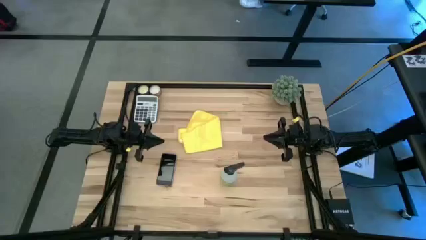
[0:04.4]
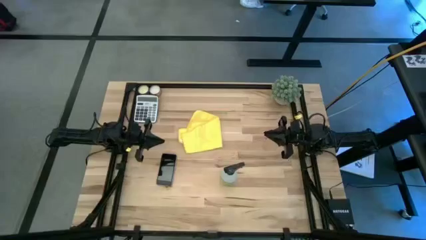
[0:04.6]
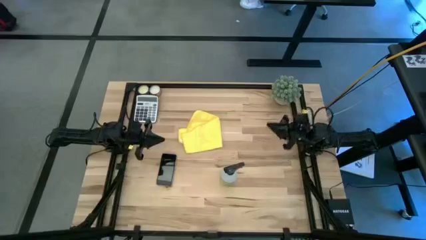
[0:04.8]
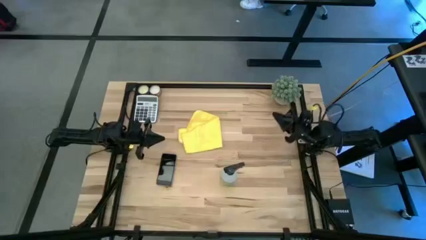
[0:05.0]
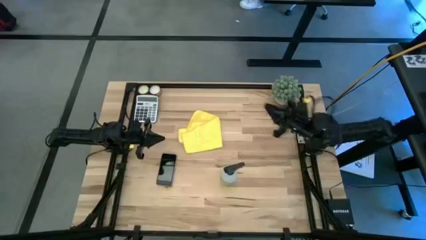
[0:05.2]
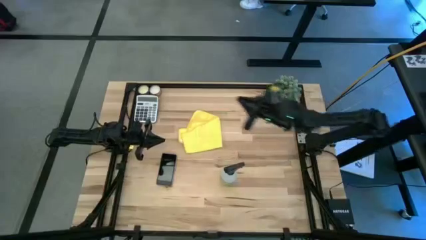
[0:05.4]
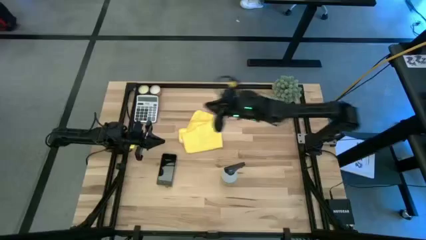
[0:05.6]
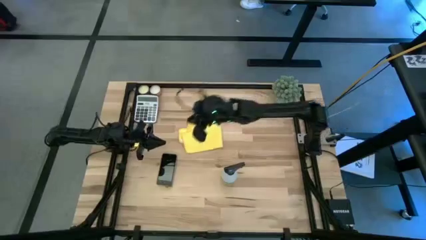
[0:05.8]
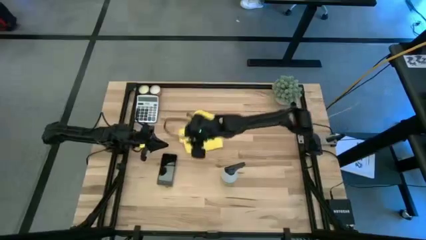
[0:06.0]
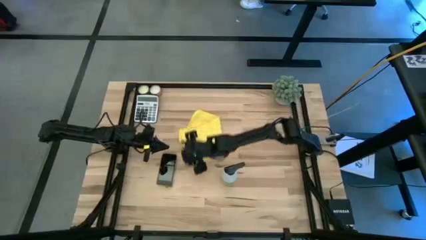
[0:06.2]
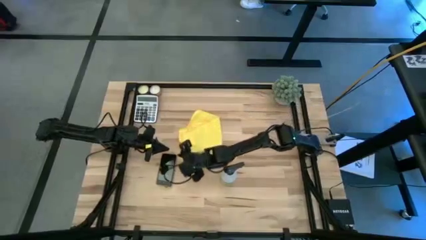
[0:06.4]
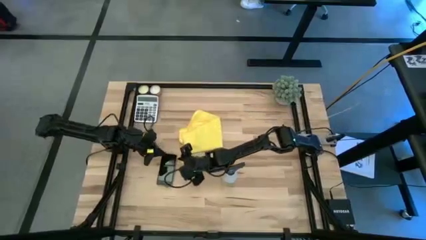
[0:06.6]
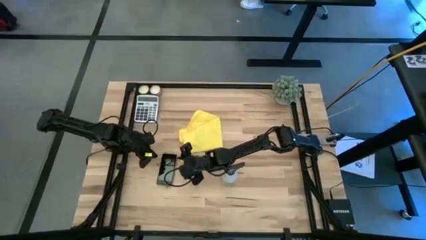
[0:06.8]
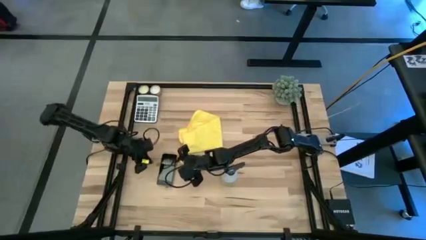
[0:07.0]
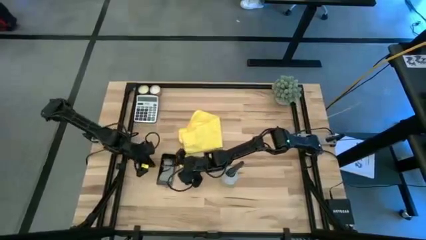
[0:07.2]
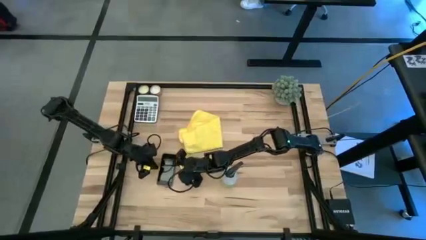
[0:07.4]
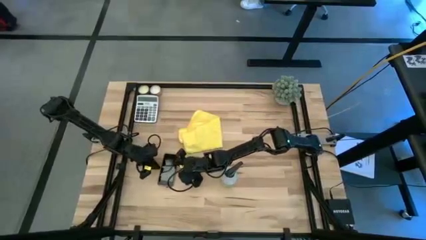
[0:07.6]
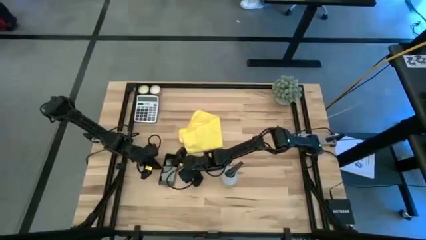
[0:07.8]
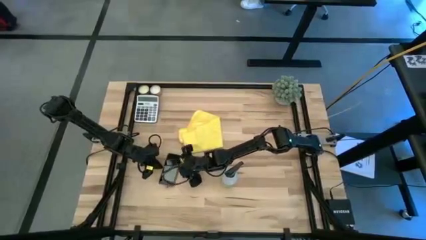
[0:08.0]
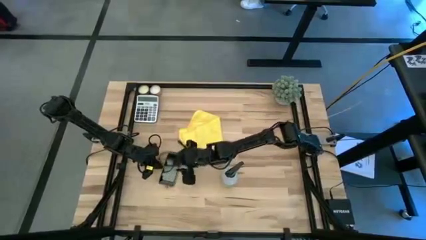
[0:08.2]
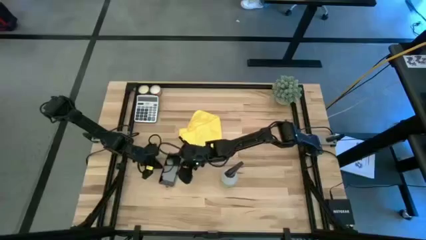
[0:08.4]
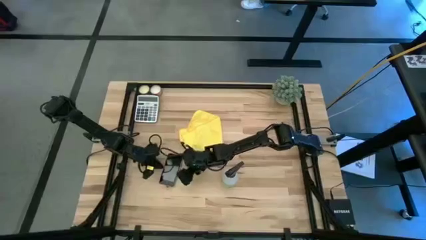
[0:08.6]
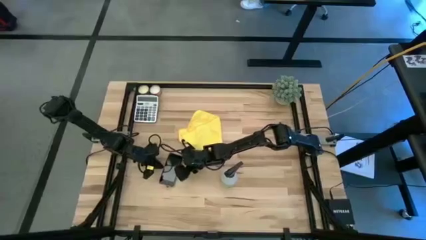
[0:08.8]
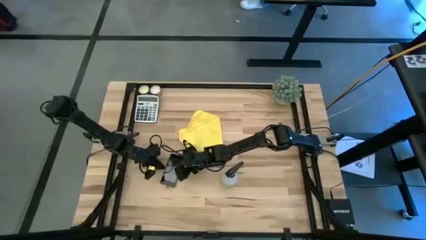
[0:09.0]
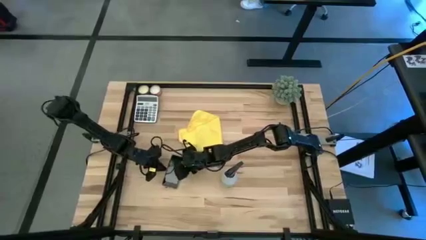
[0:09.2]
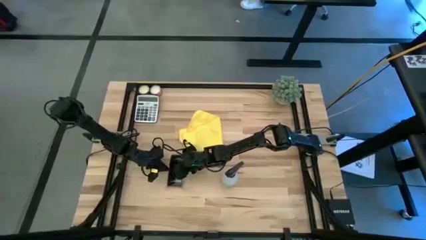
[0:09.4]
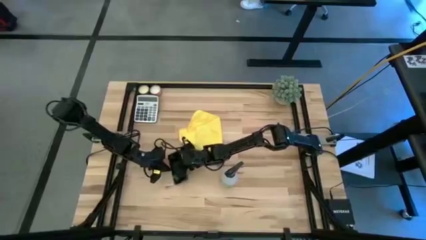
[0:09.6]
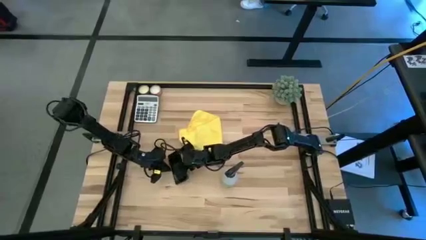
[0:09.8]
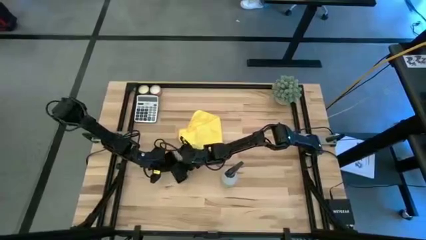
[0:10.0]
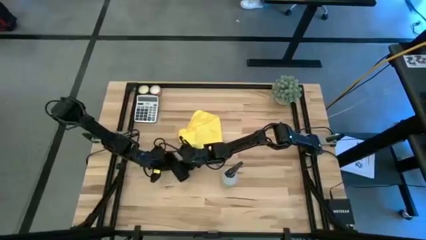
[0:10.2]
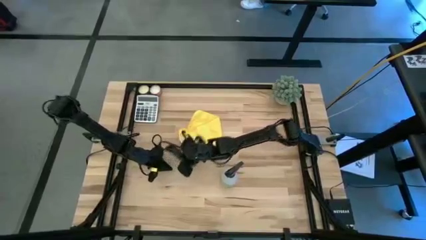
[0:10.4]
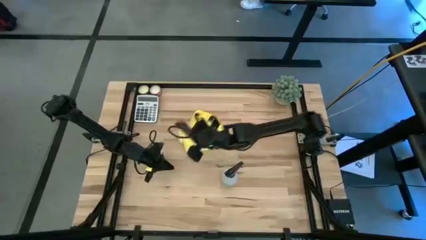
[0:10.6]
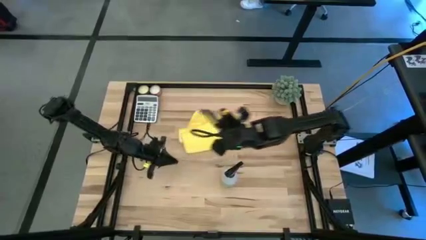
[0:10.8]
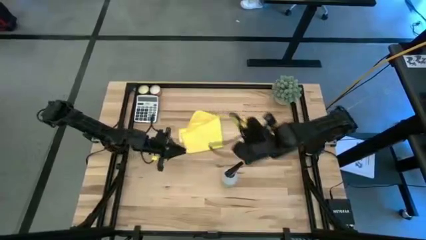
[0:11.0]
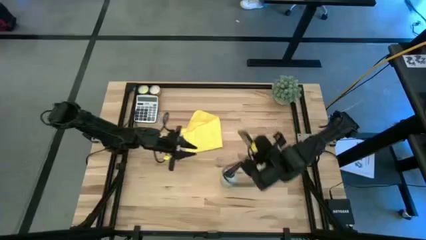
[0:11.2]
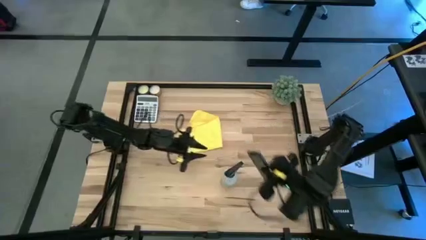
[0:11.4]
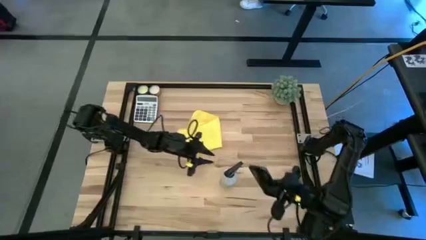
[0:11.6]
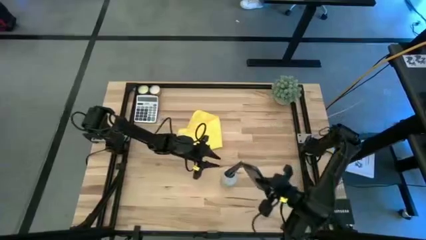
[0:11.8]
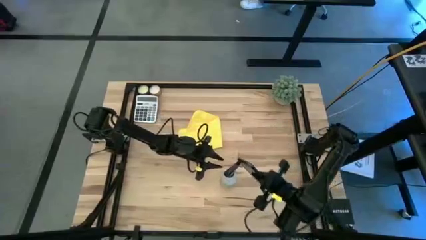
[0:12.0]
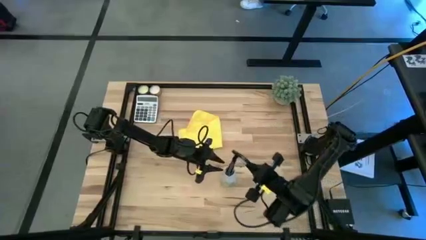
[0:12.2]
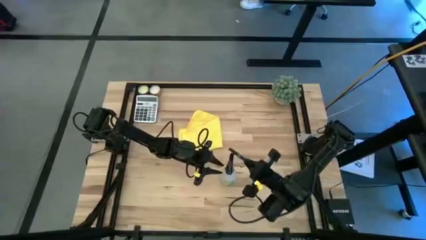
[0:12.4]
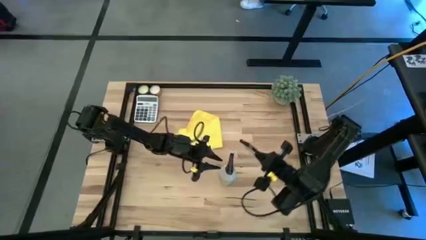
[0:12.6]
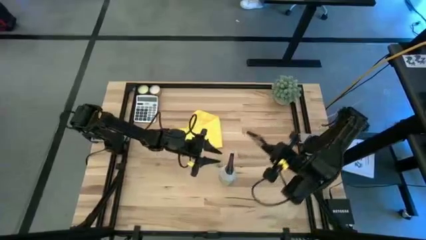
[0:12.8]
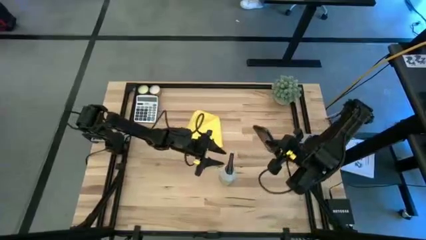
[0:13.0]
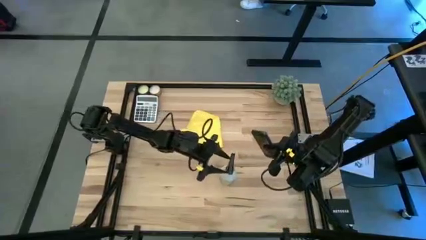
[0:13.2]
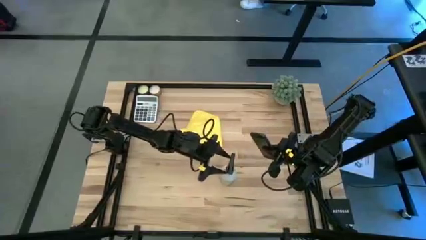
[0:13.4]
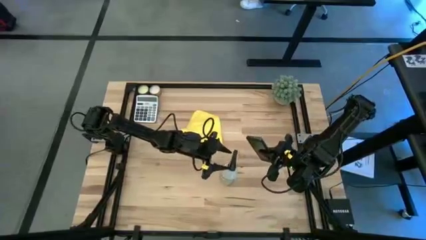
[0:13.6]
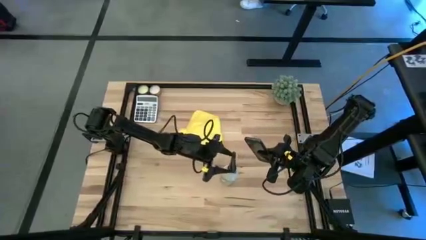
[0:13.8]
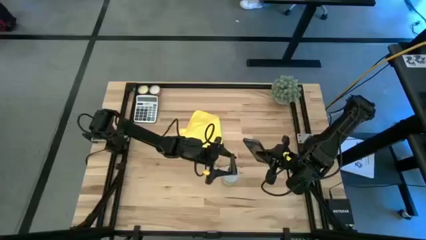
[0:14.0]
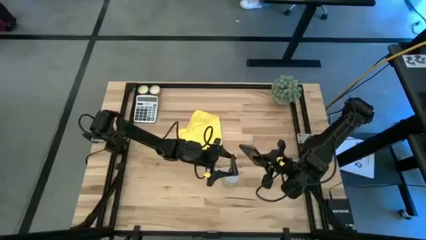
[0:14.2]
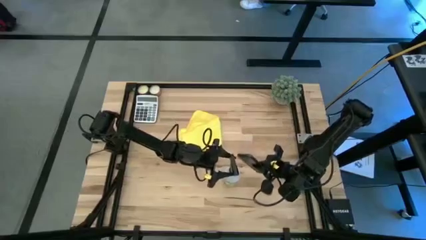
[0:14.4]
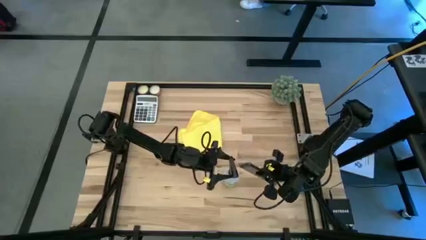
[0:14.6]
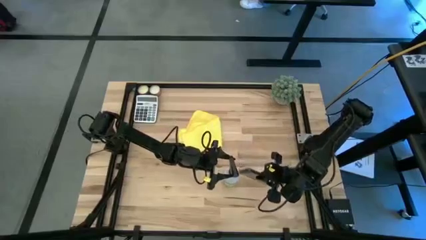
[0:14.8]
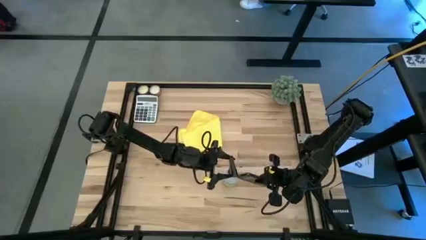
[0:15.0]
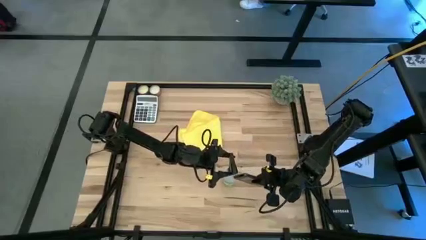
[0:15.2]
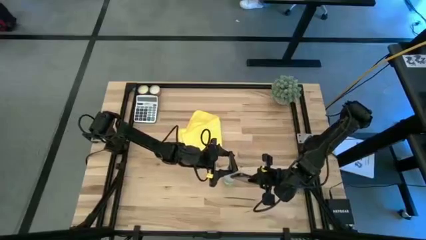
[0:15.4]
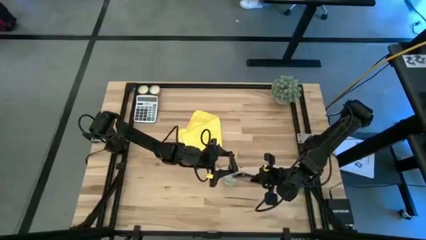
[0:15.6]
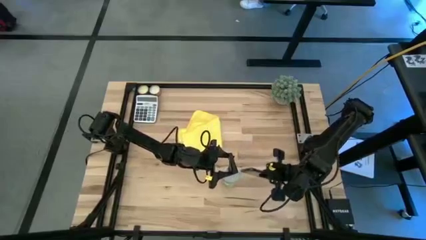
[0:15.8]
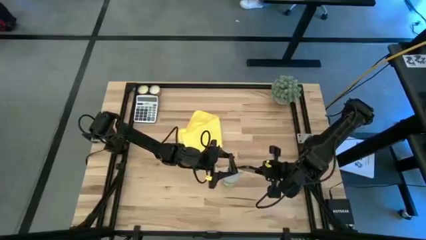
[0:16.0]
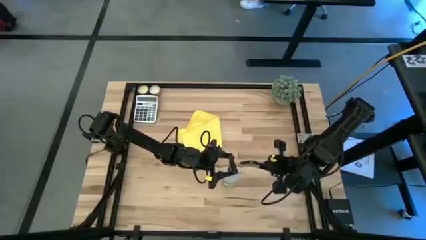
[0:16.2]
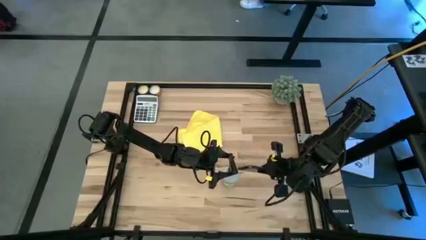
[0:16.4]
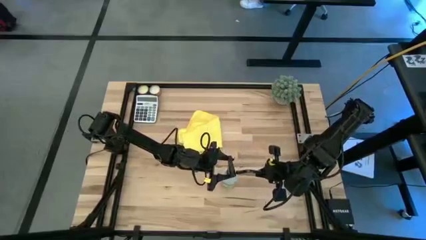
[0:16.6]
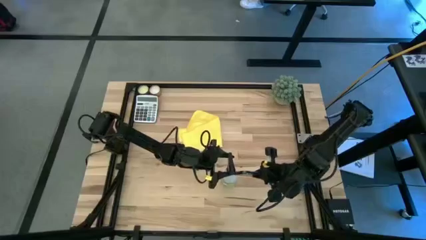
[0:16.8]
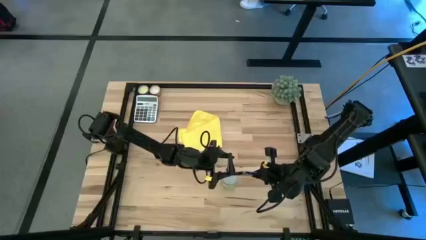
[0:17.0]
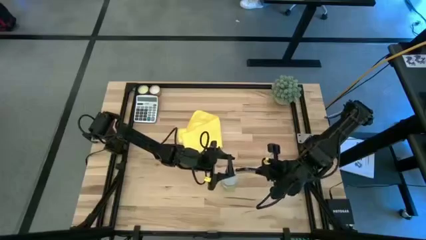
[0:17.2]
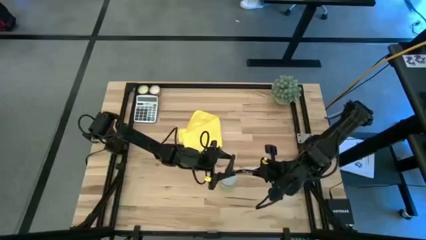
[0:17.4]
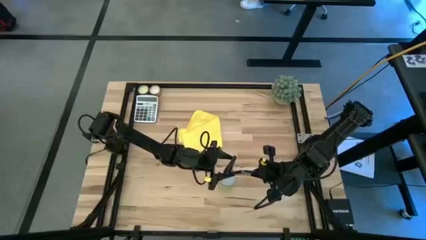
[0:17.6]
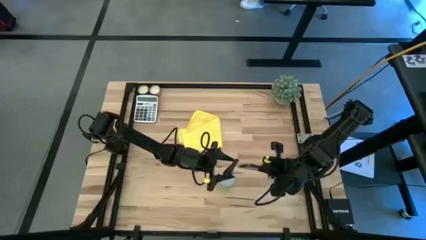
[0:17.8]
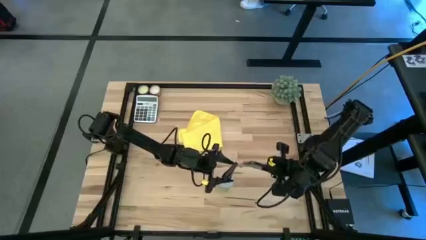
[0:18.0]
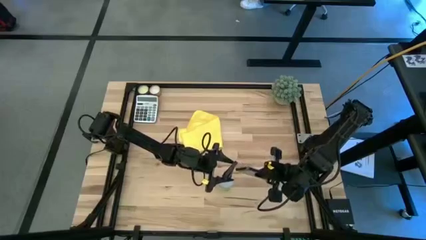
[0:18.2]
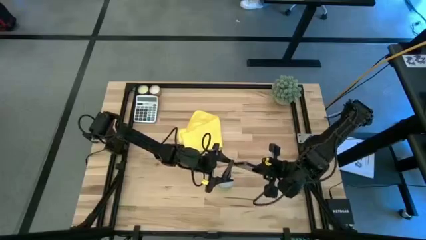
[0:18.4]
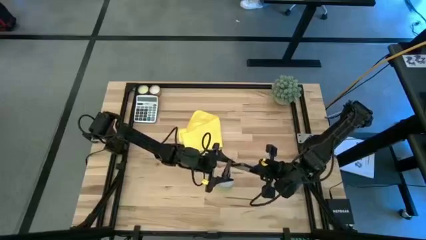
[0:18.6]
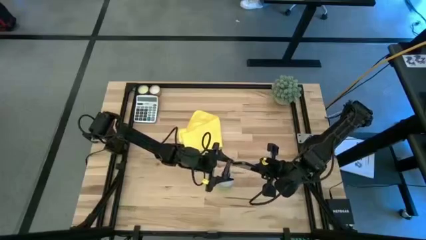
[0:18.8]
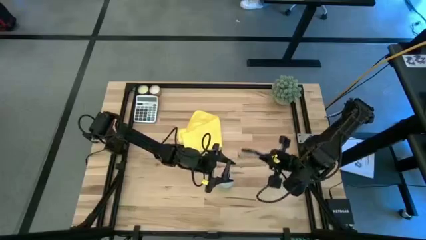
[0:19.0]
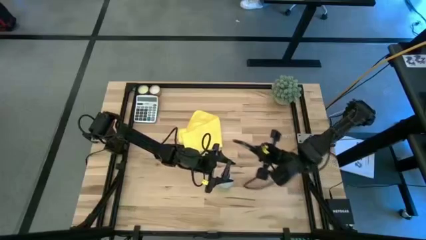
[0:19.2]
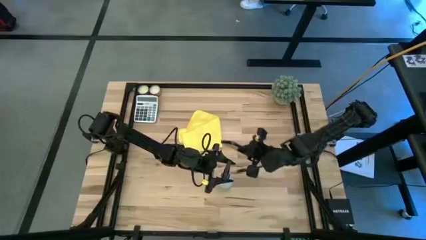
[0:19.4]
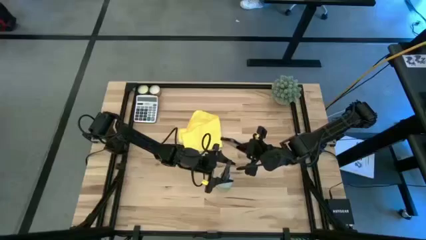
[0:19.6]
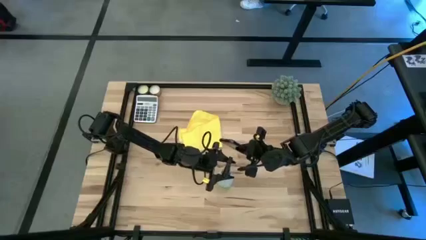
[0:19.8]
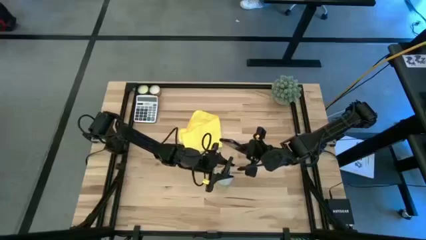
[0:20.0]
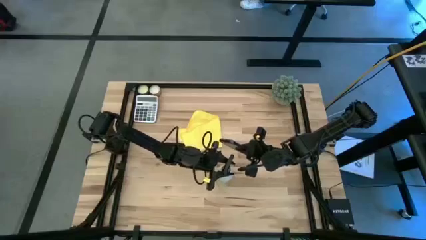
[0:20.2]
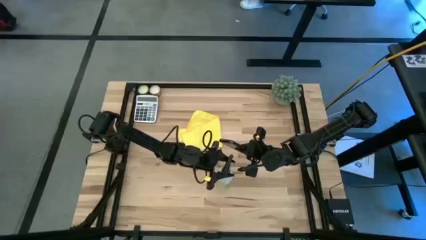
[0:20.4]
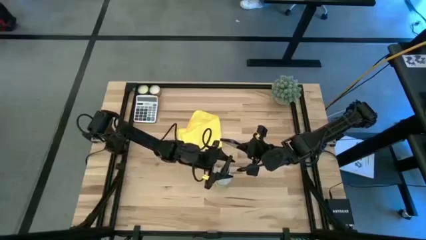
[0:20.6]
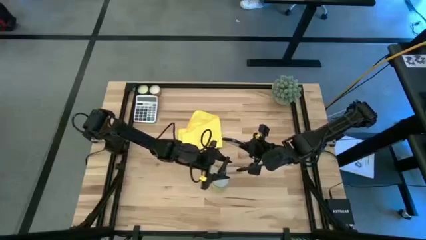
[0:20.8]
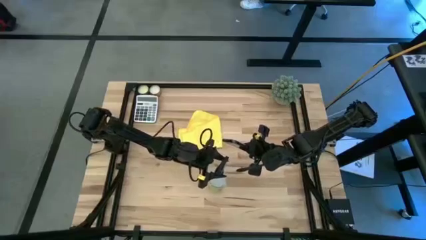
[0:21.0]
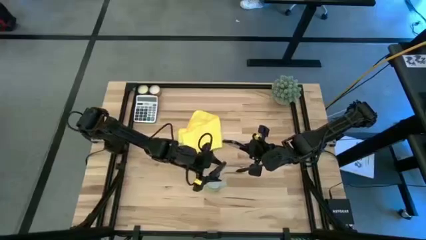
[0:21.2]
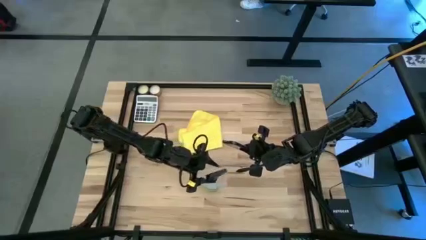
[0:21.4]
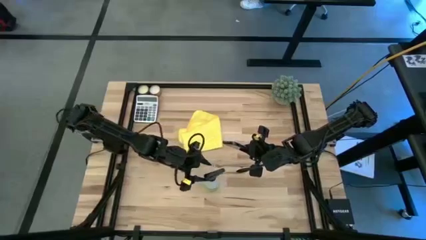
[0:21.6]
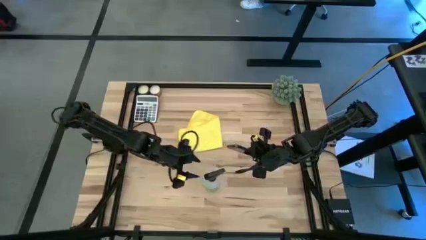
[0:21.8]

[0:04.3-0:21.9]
Task: Apply microfiber cloth
Spray the front screen of the black cellphone using the spray bottle
